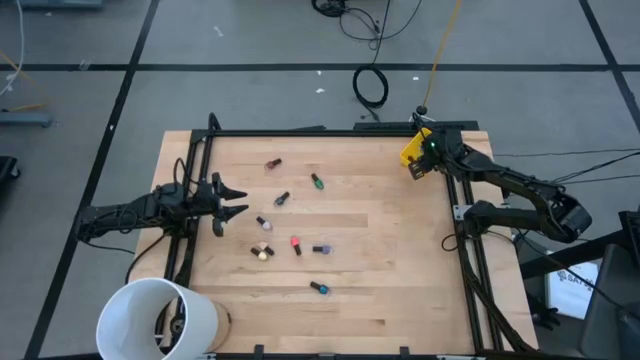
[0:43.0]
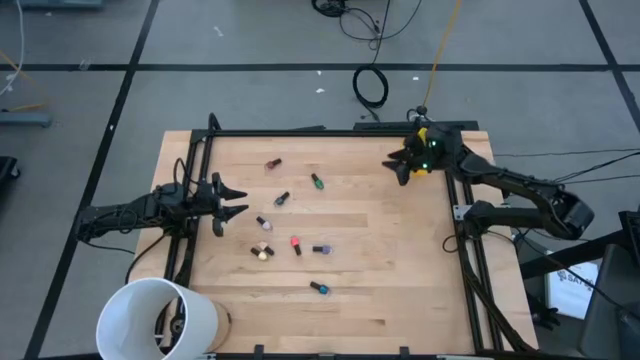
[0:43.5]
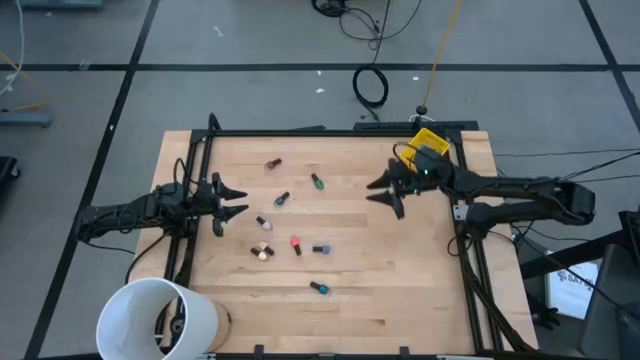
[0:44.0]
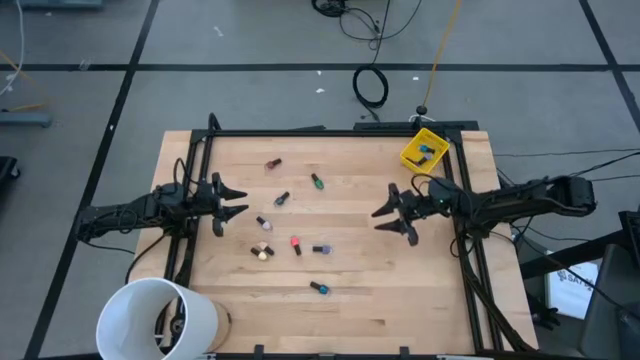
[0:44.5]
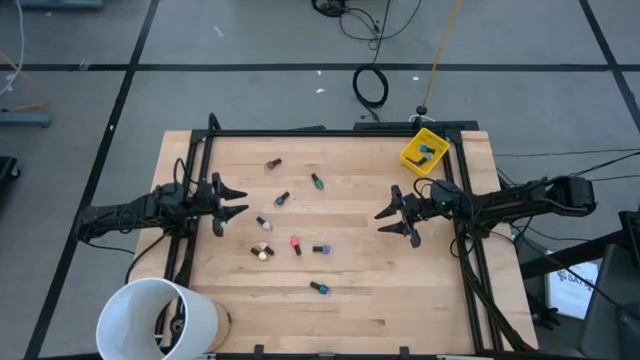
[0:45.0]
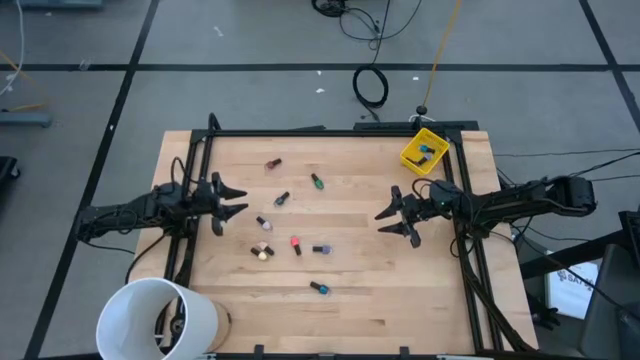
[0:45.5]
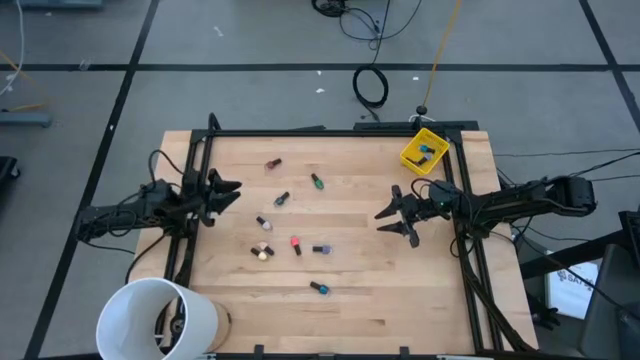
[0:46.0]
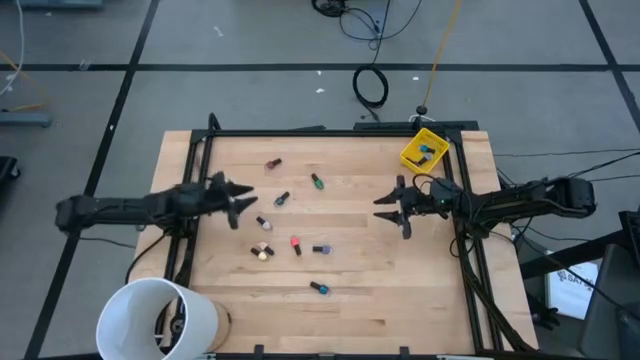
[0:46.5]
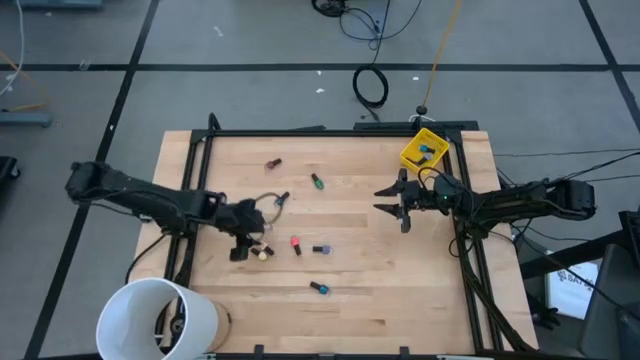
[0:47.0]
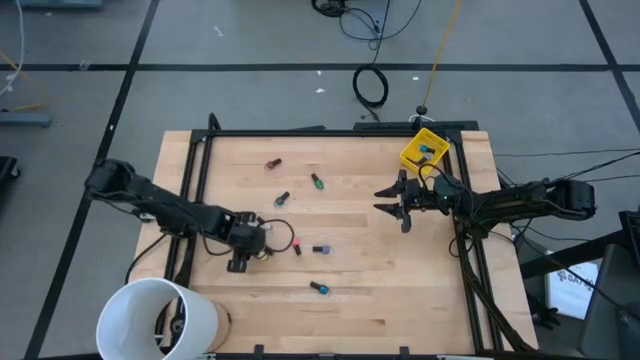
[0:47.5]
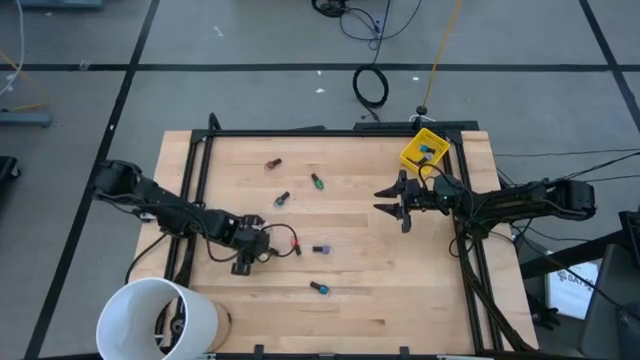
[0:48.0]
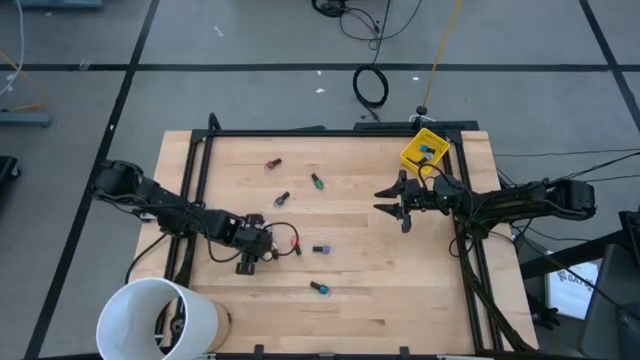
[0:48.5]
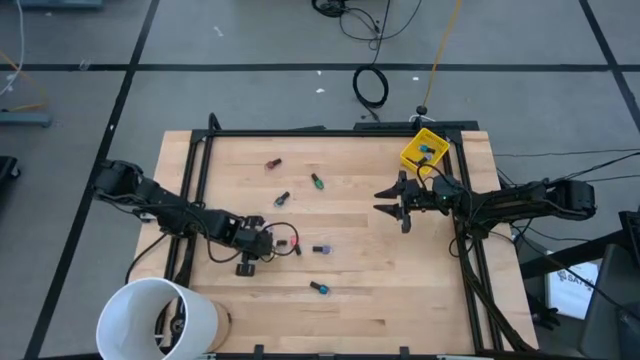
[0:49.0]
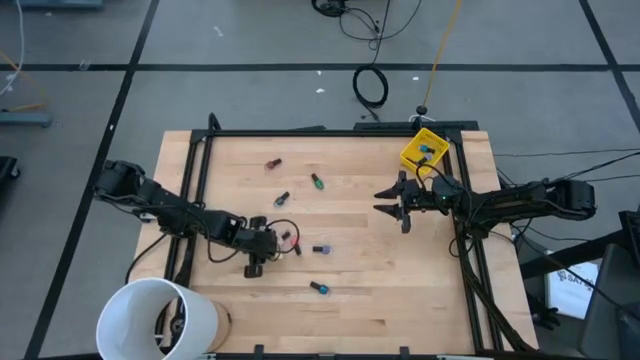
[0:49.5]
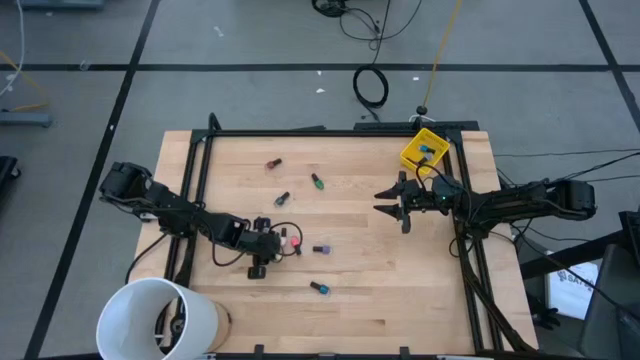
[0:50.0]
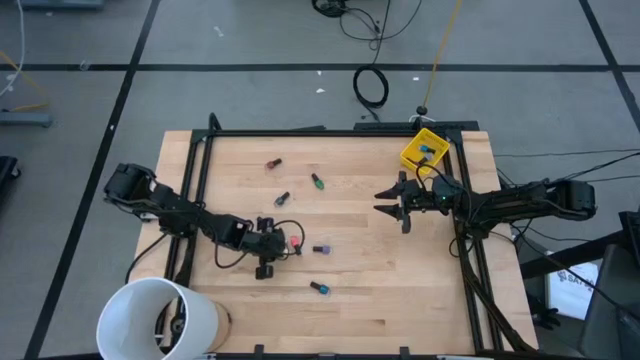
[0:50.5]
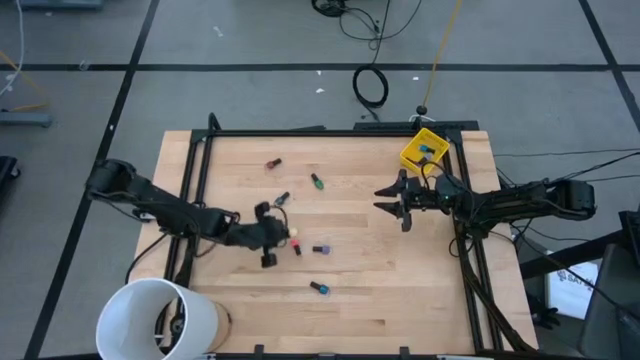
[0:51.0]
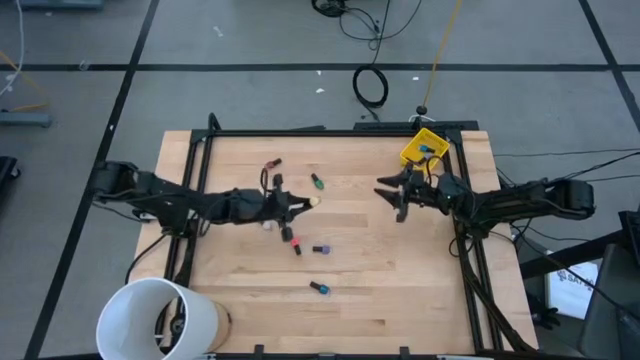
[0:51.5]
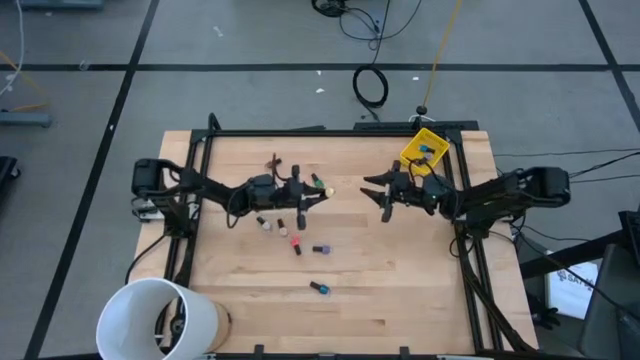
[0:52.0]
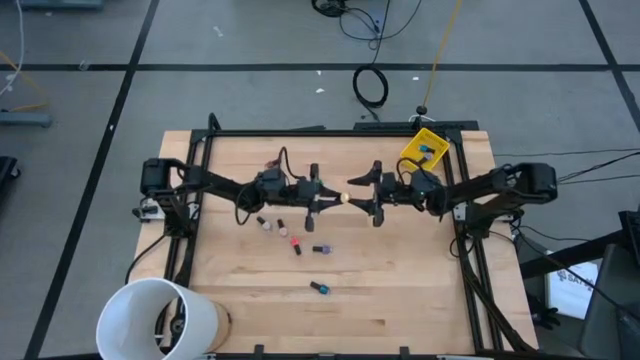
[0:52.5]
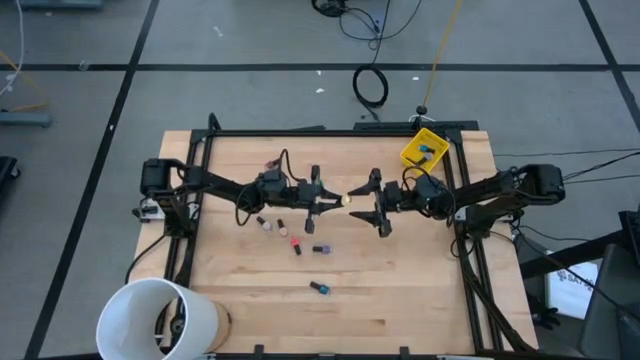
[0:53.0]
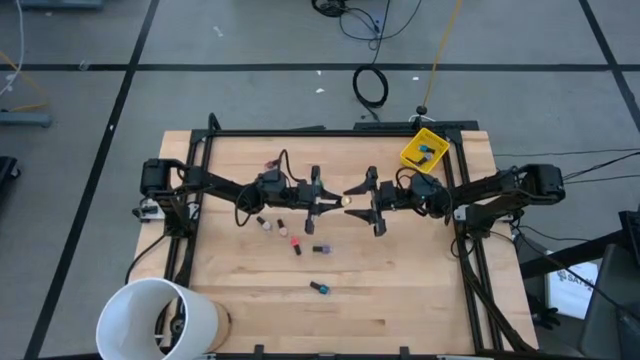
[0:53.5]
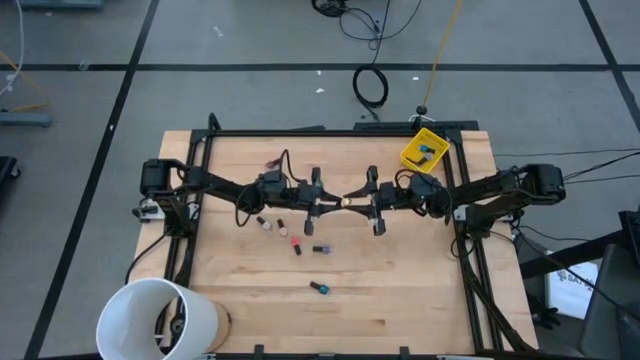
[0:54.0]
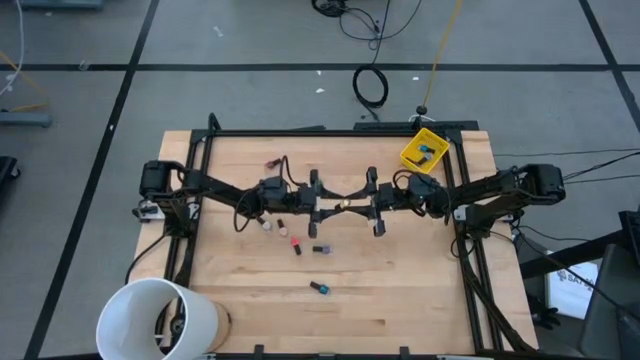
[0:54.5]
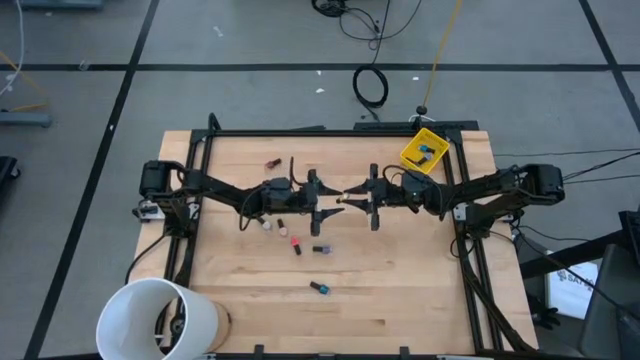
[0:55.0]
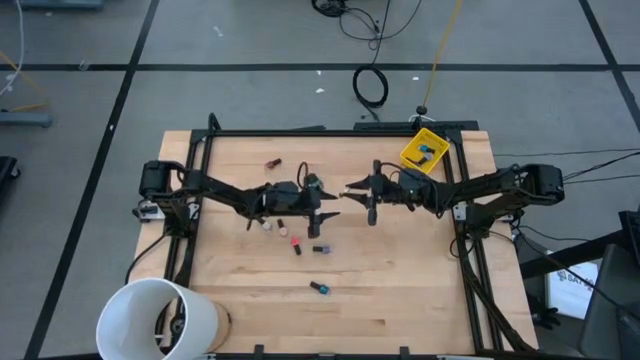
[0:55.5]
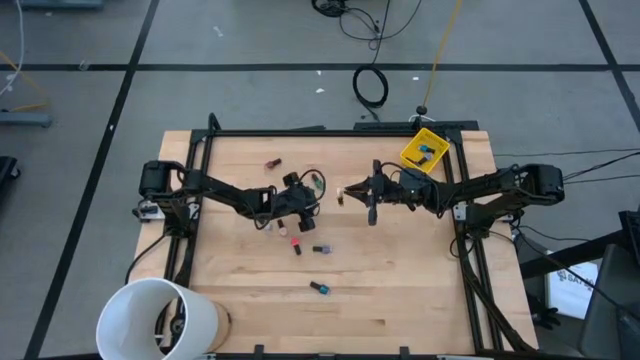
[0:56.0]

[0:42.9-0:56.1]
Task: Pick & Place Nail Polish
Put the yellow nail polish bottle into the yellow bin

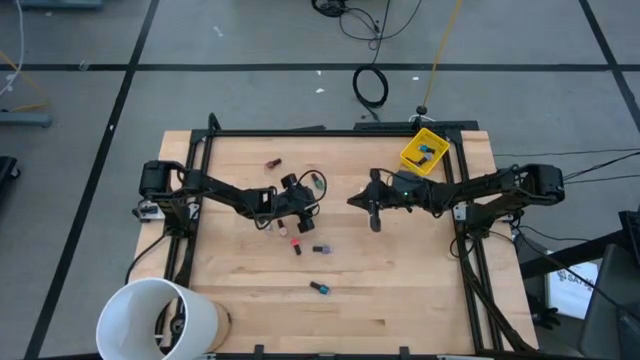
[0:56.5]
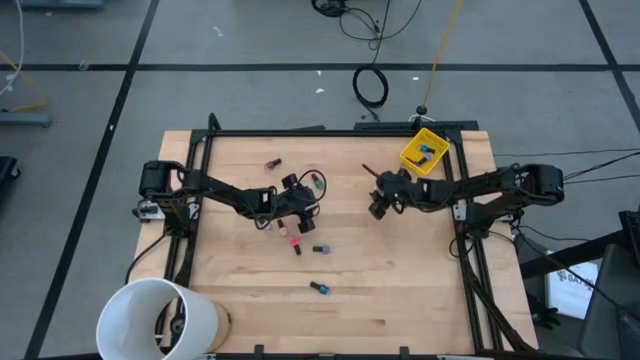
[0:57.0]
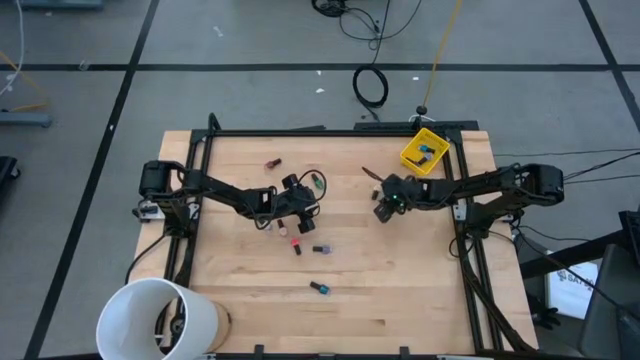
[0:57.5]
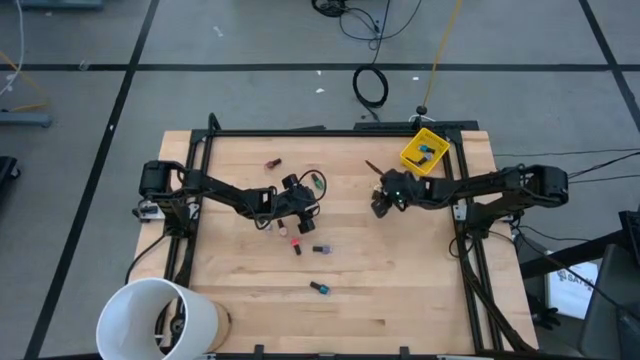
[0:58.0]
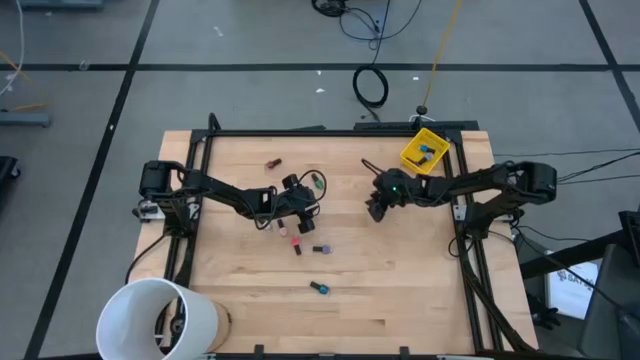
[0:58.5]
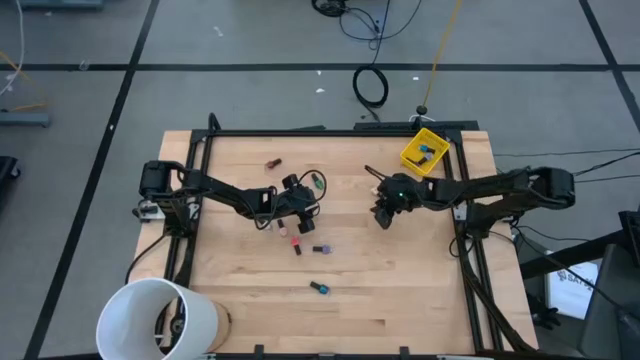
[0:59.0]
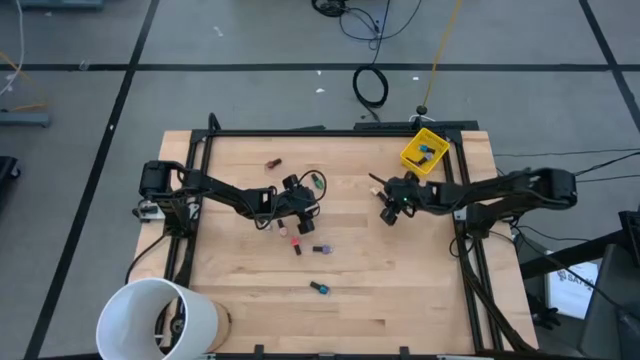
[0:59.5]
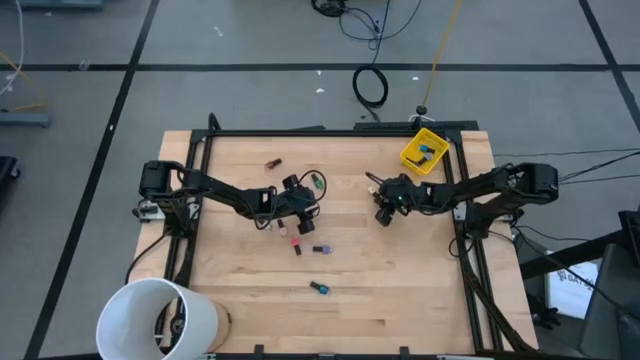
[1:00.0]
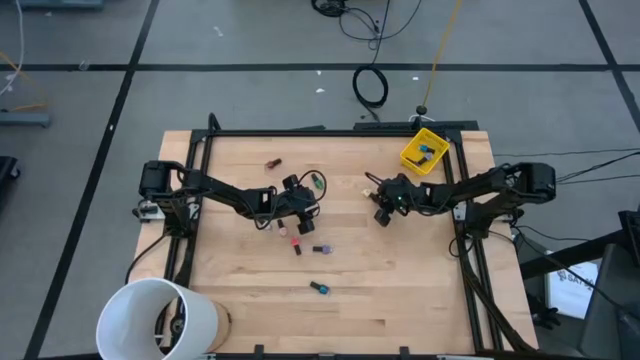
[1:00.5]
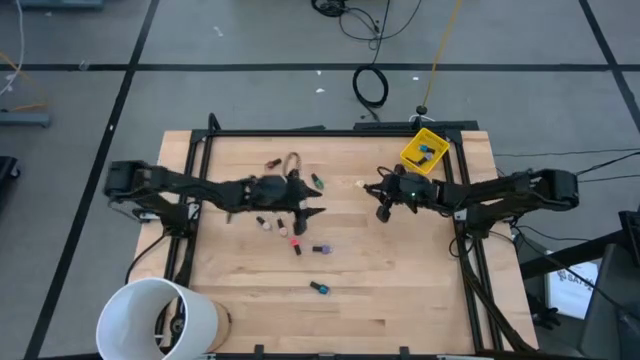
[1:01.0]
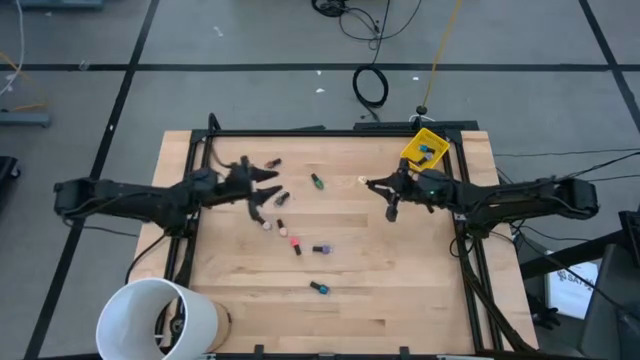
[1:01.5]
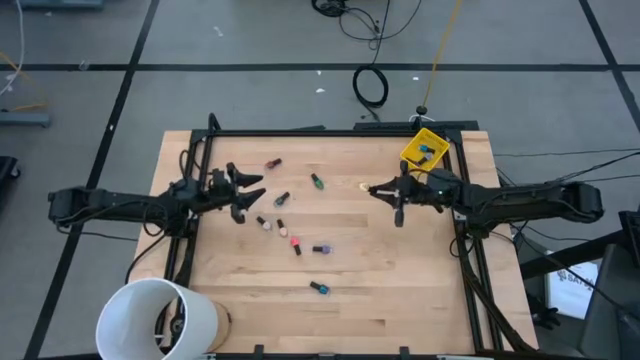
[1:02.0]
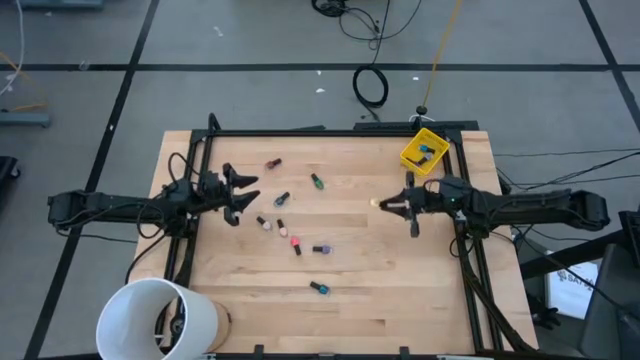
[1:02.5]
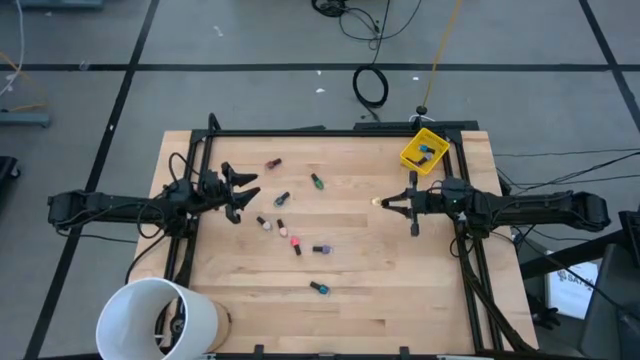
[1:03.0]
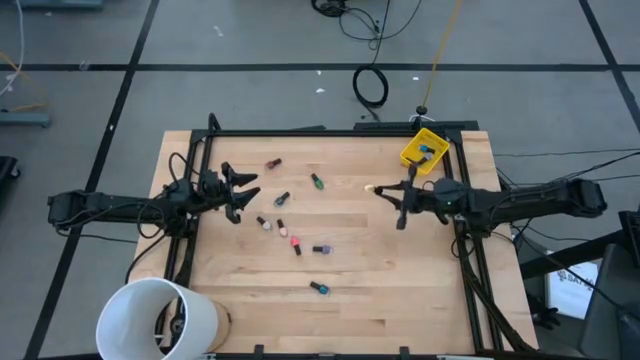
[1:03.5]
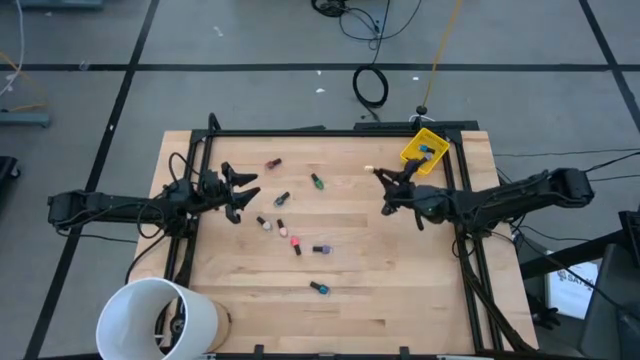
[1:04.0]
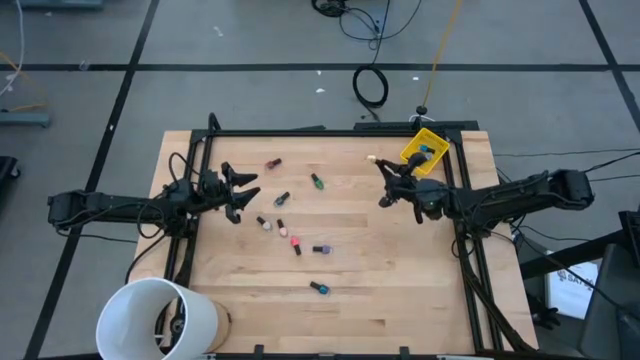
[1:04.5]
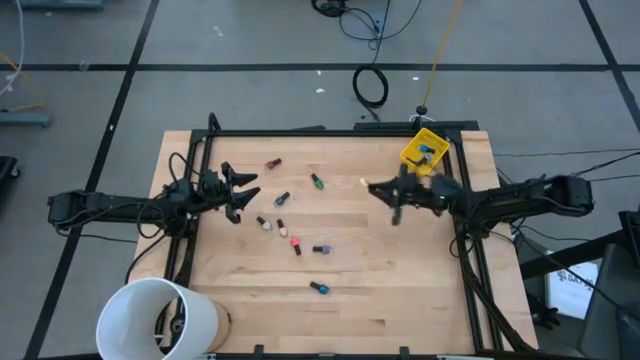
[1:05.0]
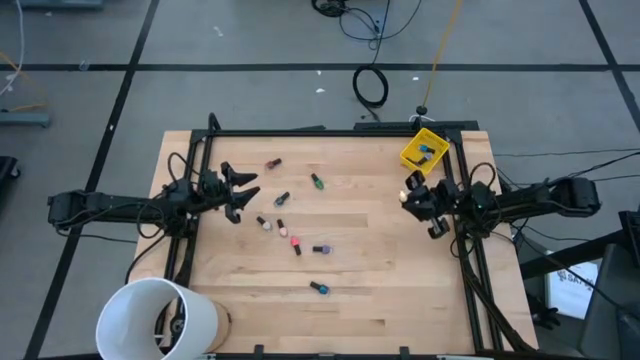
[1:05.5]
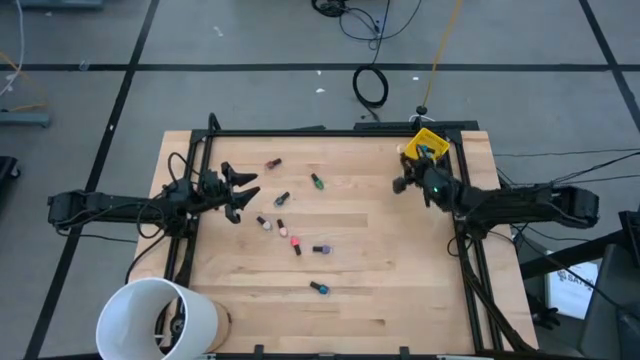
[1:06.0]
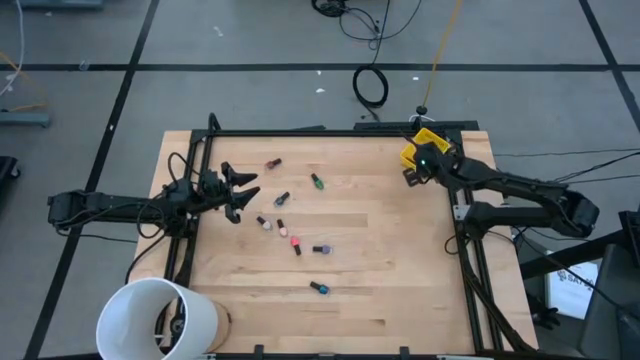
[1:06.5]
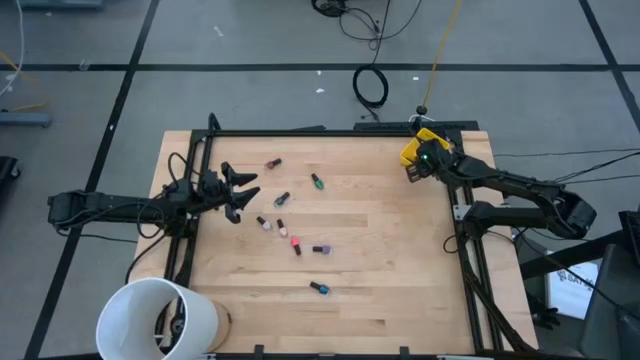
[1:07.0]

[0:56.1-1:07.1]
Put the yellow nail polish bottle into the yellow bin
